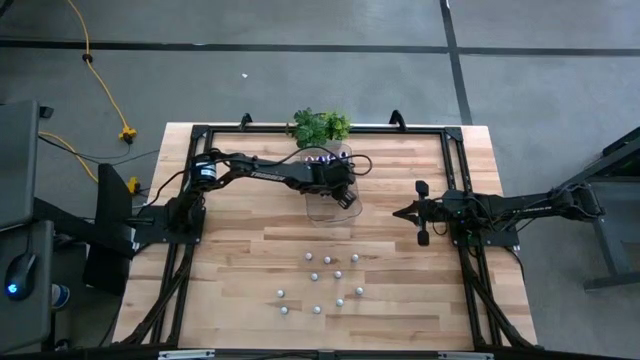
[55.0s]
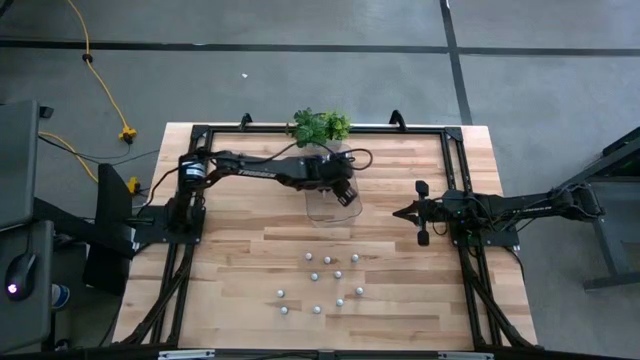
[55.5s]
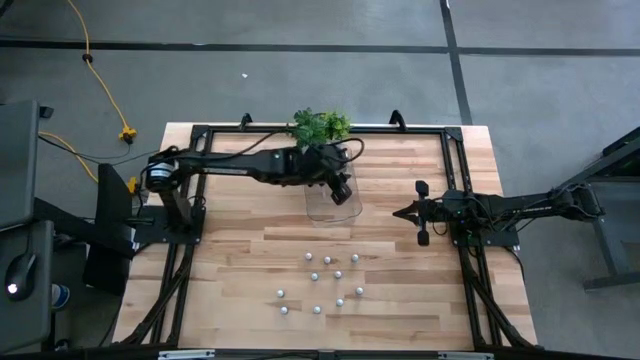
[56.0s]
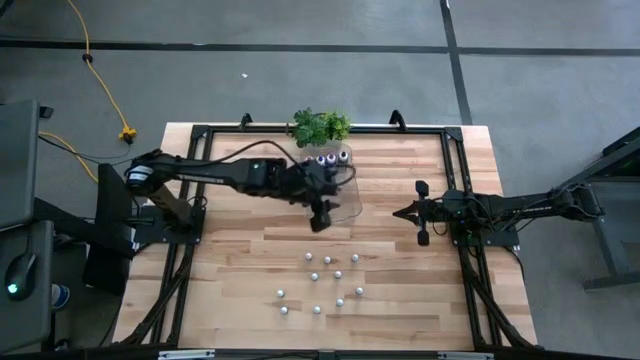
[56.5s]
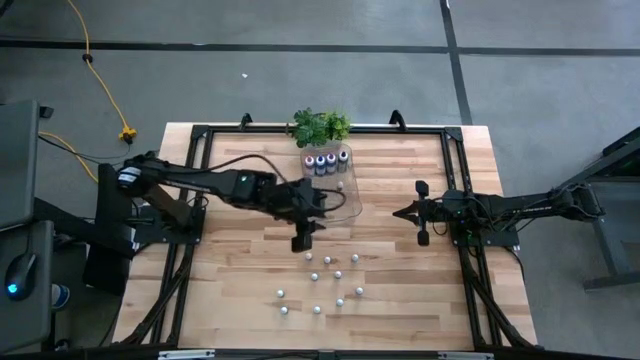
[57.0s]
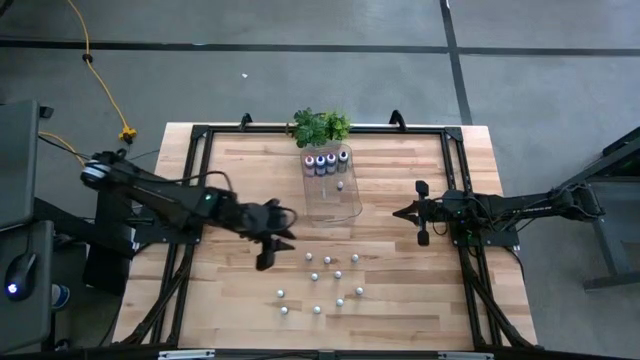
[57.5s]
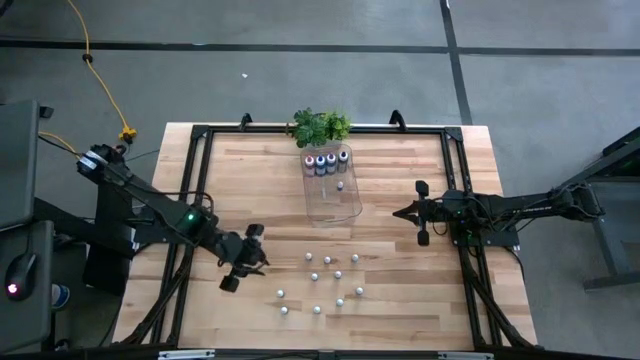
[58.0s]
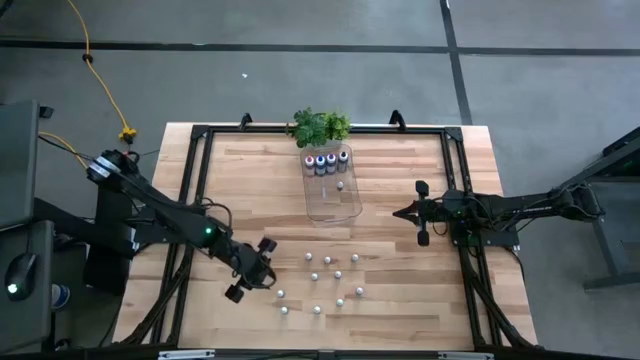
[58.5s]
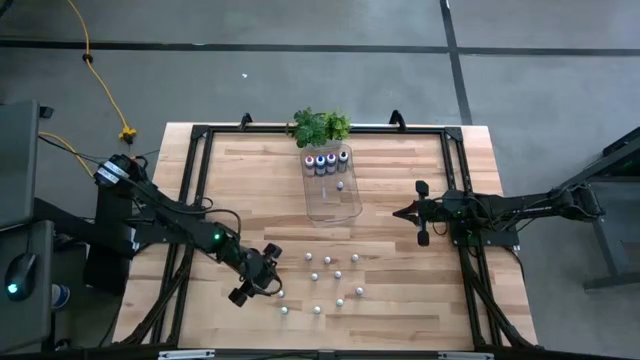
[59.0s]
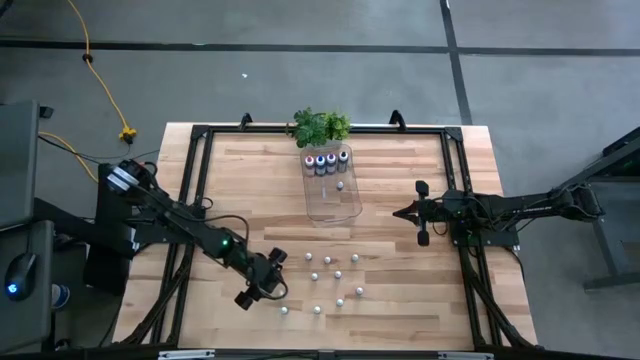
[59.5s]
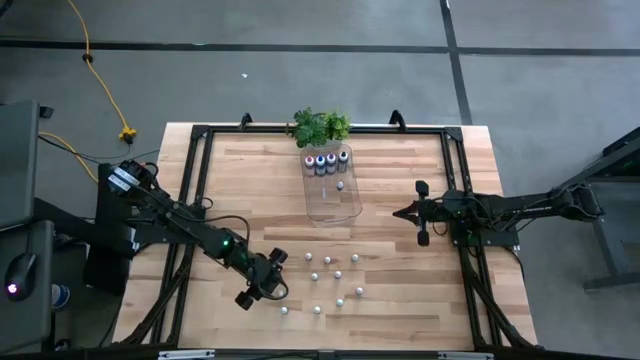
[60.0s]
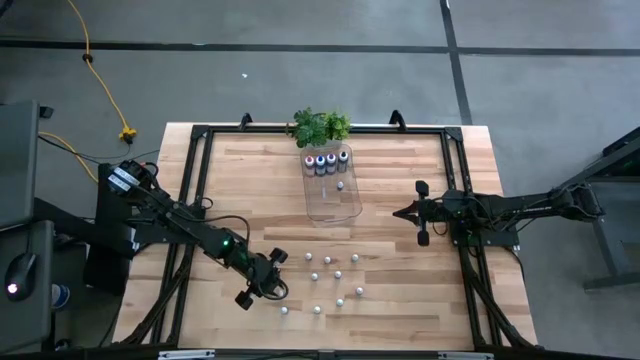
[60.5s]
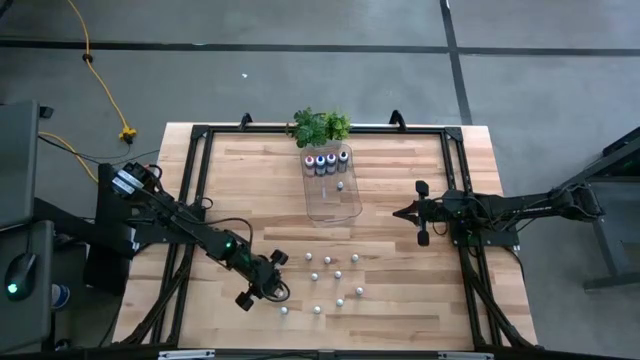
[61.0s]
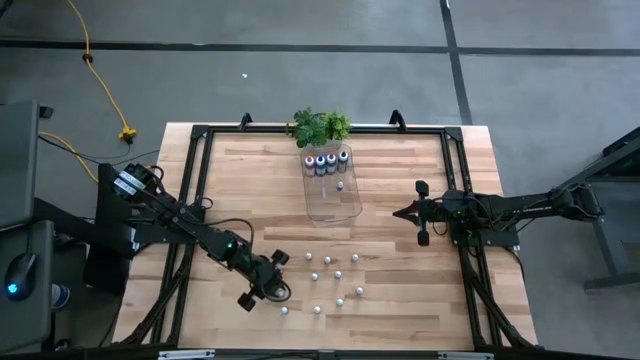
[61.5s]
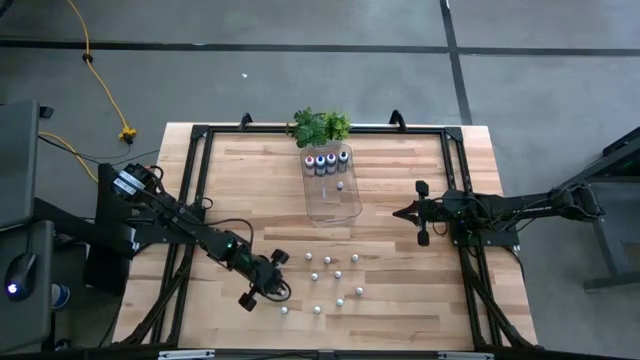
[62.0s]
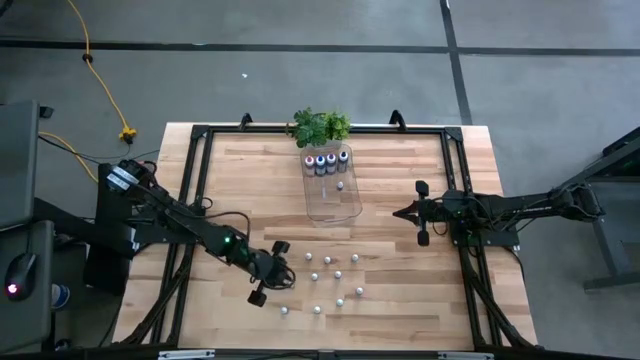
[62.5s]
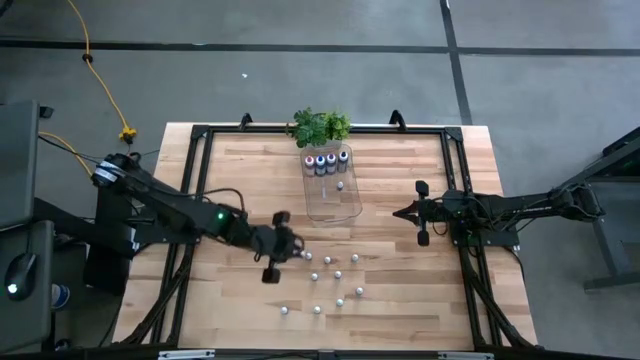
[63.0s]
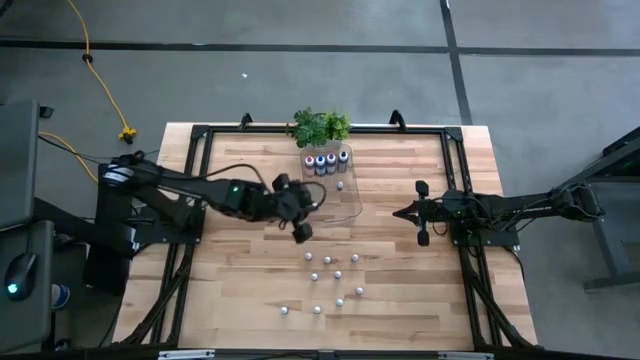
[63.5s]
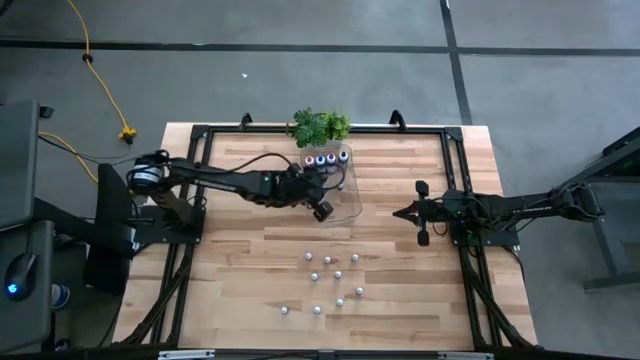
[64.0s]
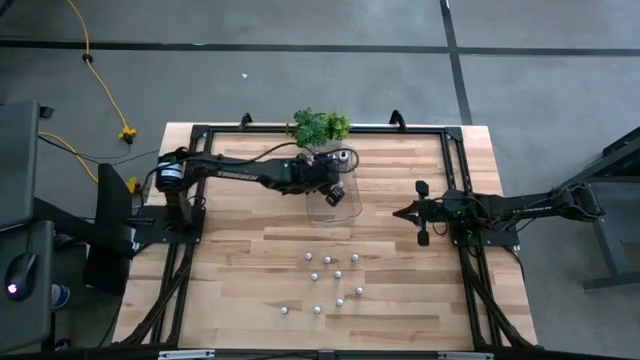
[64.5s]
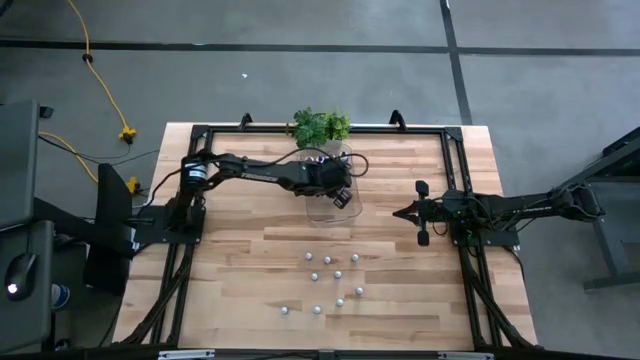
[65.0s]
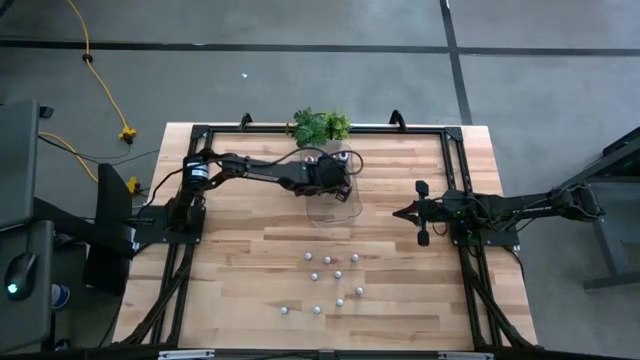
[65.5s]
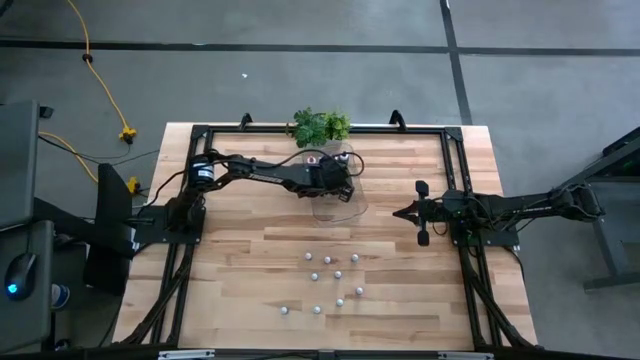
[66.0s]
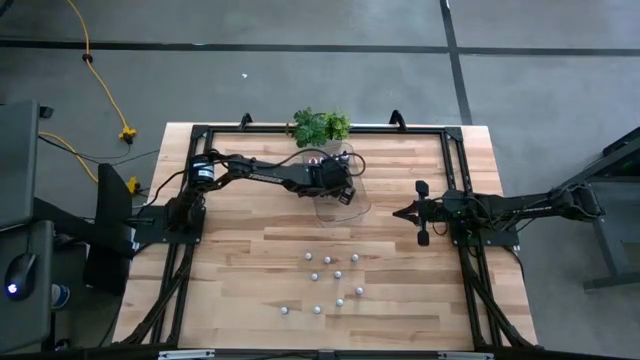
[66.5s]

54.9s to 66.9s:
Task: Pick & Place food coloring
Put the bottom small green food coloring bottle into the transparent bin

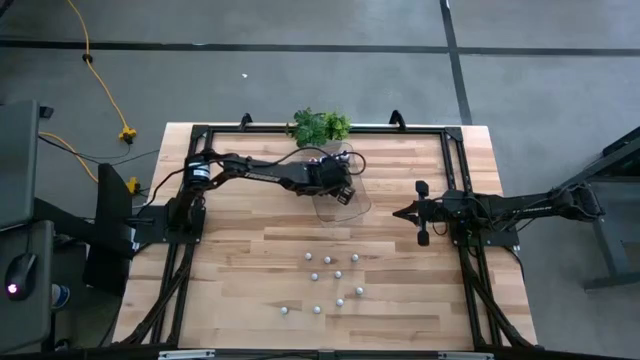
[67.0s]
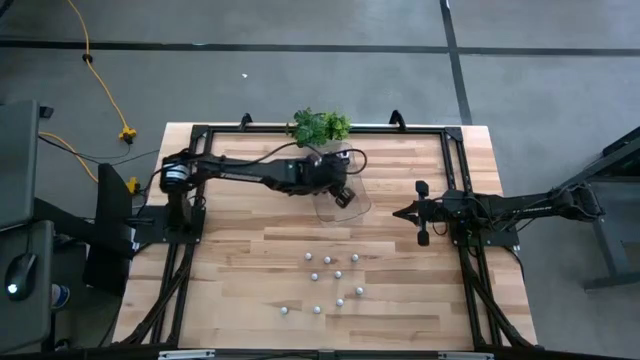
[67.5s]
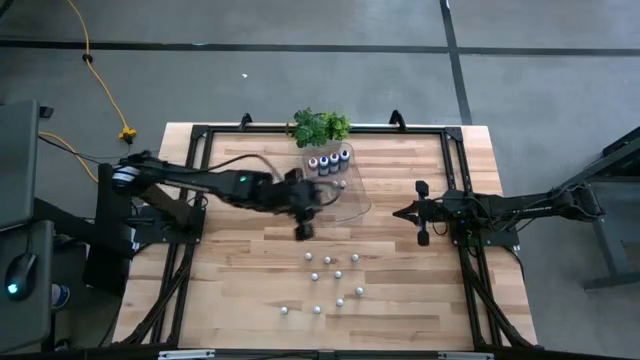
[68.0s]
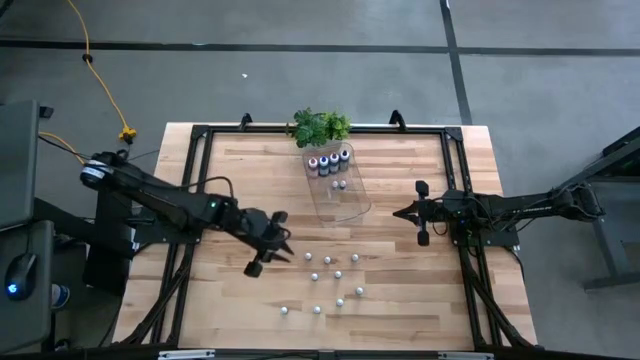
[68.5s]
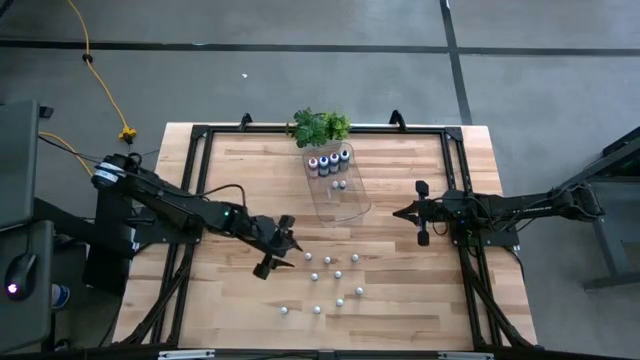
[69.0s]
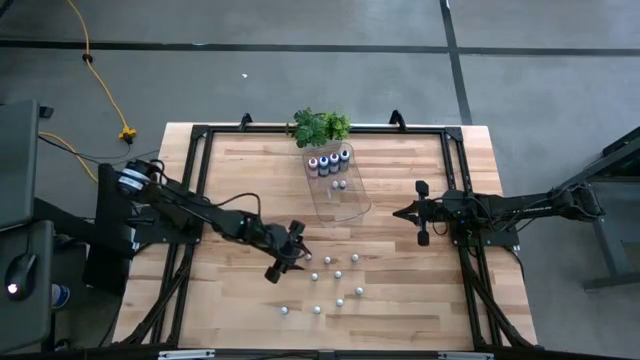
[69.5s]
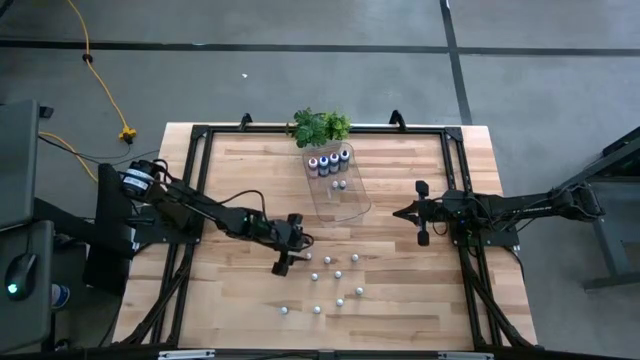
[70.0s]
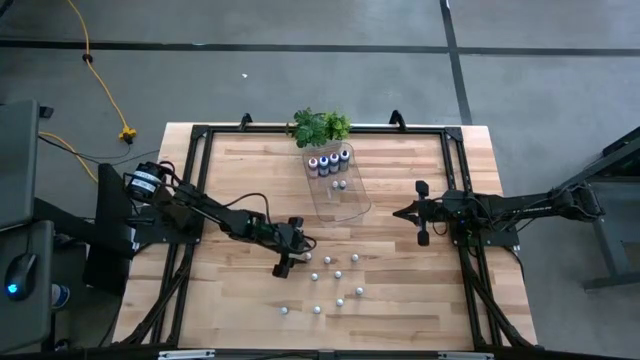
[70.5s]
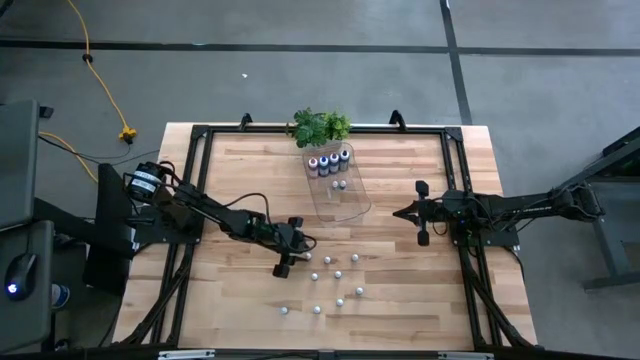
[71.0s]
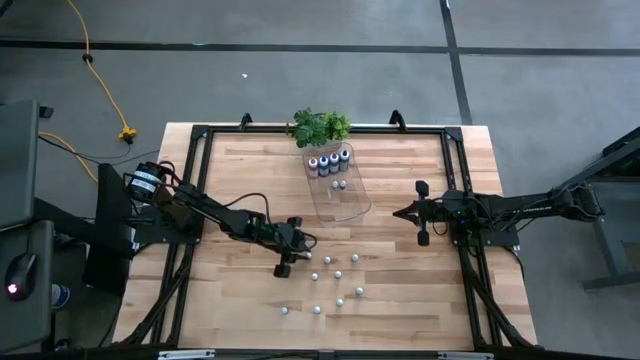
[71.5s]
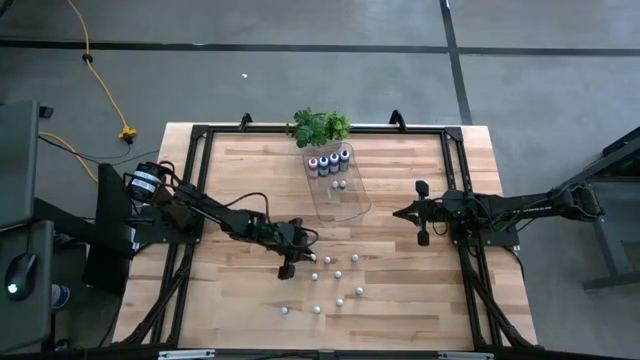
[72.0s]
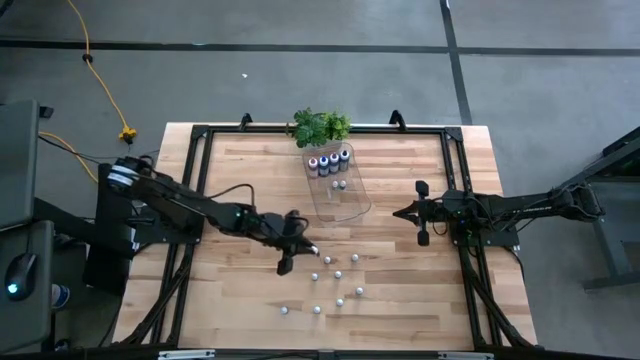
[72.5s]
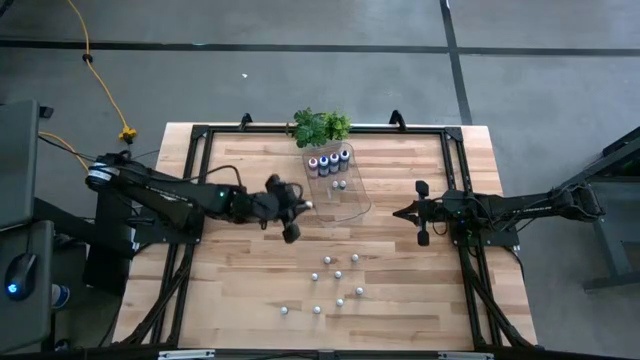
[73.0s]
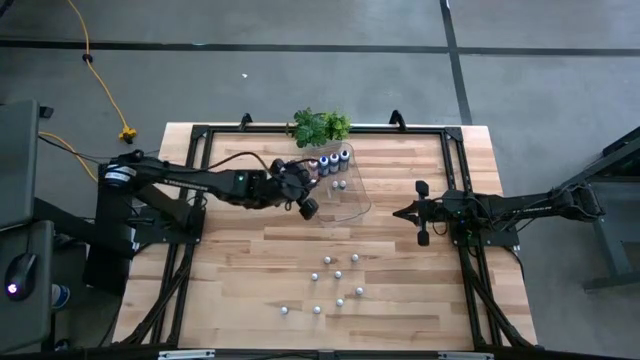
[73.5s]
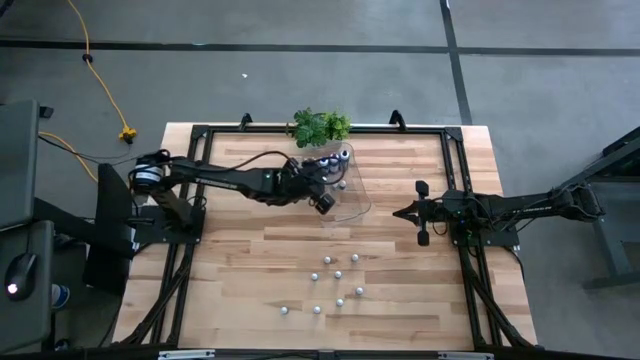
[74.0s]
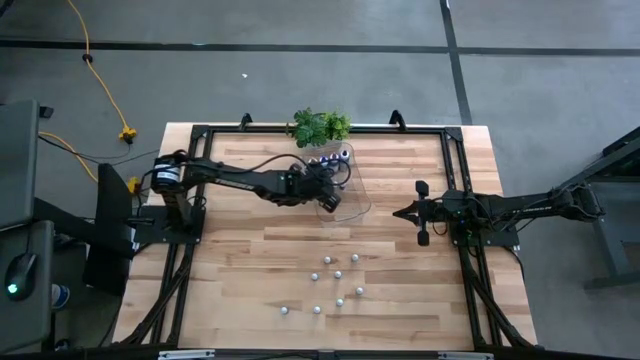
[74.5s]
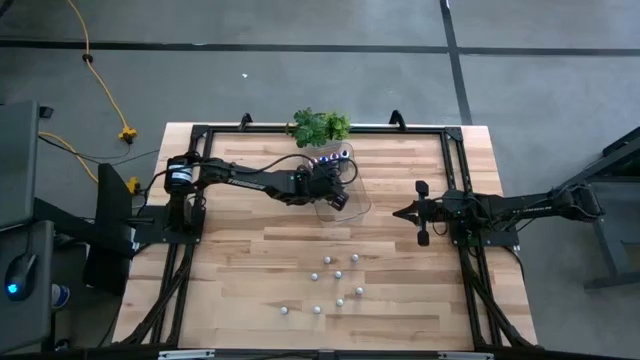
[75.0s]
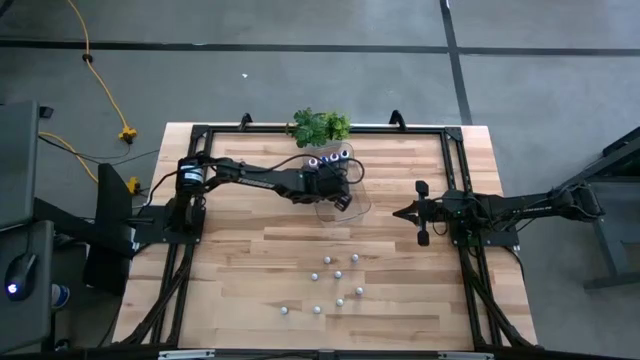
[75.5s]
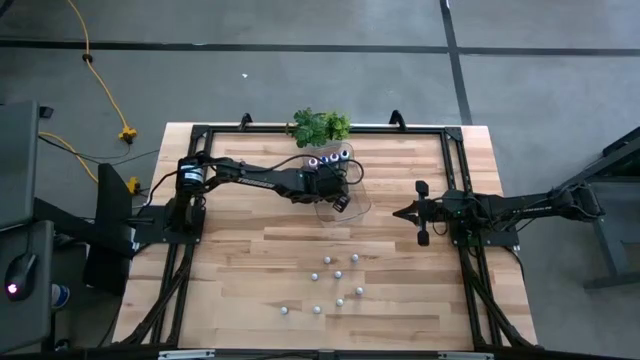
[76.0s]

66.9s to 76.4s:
Put the small orange food coloring bottle into the transparent bin
